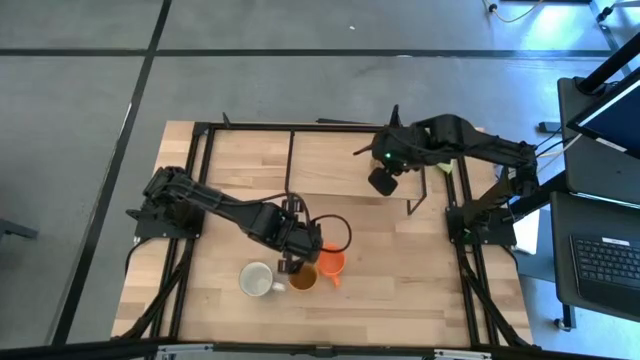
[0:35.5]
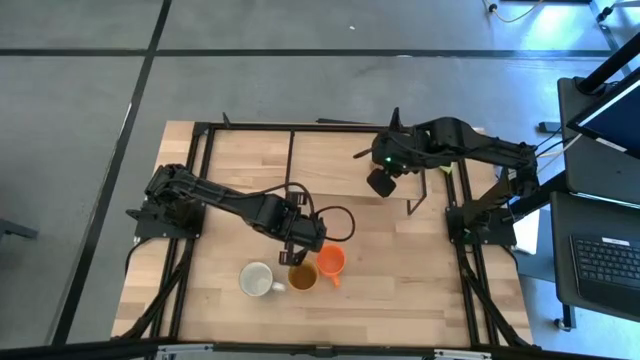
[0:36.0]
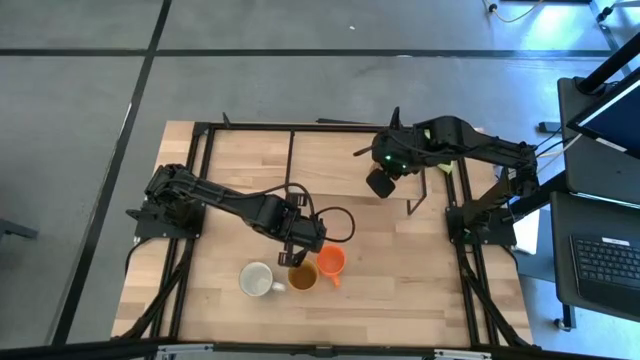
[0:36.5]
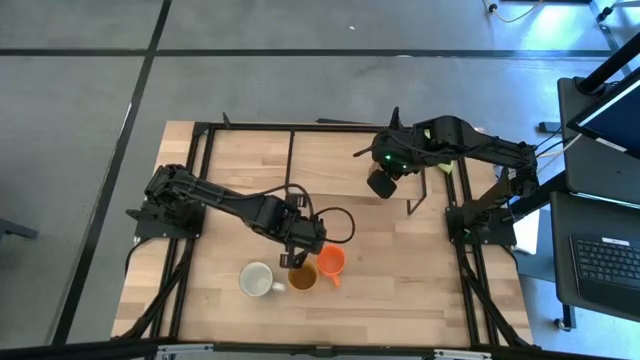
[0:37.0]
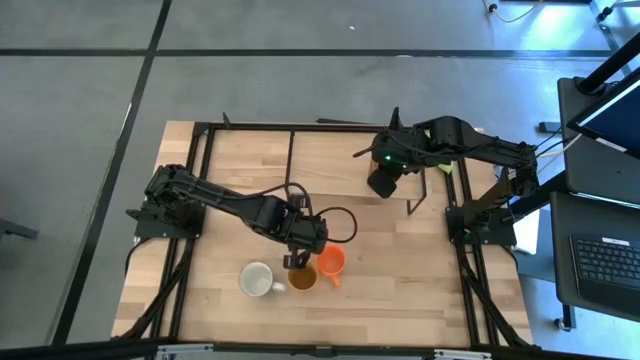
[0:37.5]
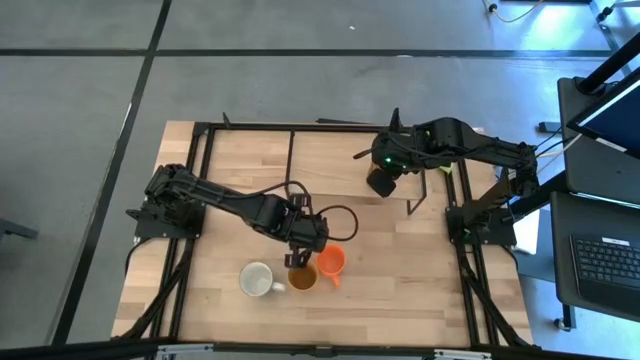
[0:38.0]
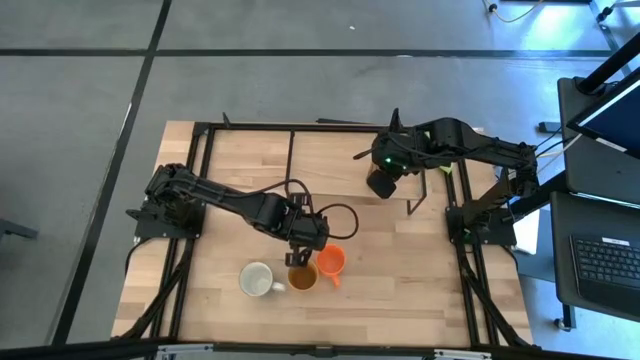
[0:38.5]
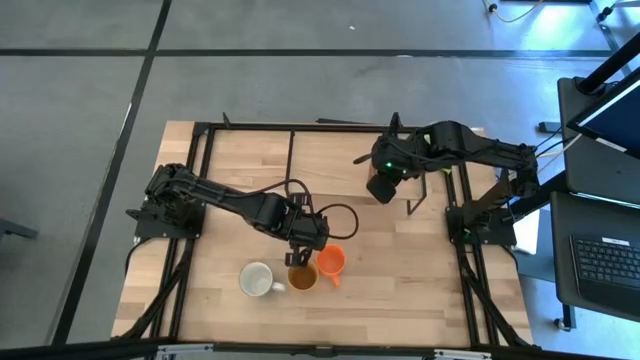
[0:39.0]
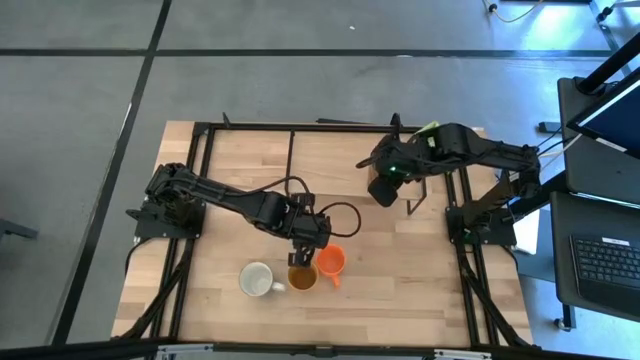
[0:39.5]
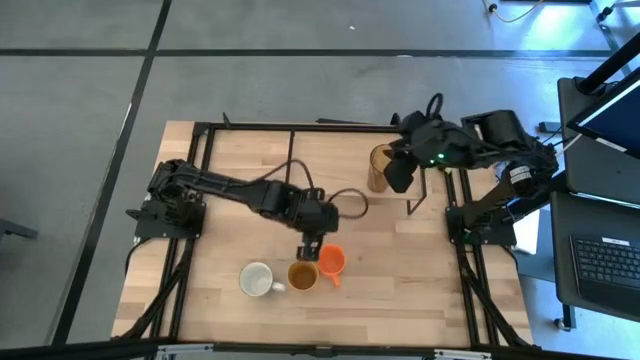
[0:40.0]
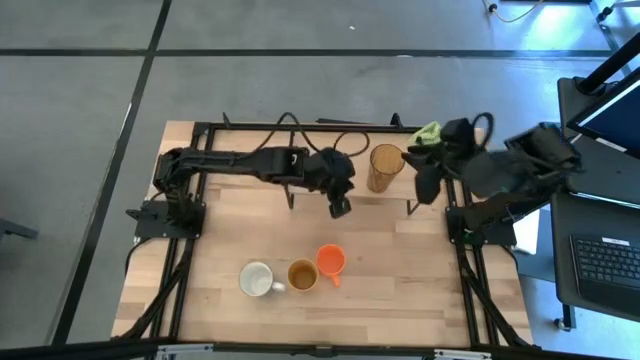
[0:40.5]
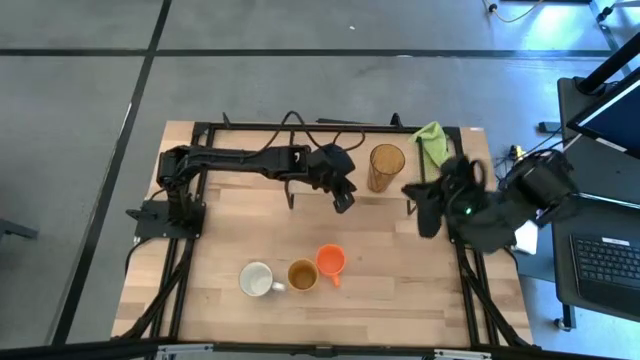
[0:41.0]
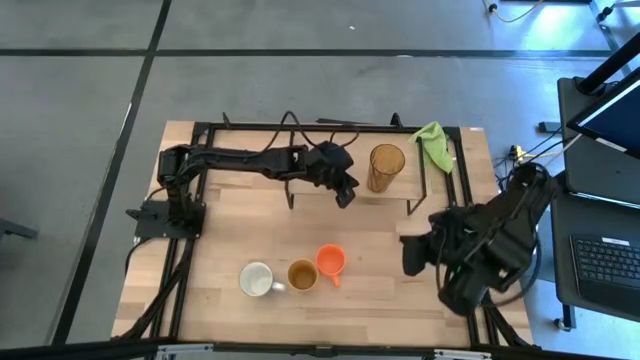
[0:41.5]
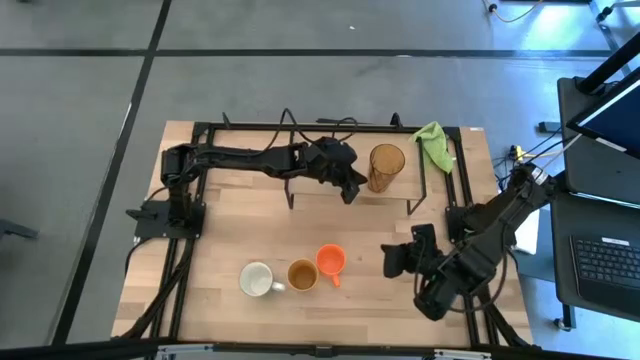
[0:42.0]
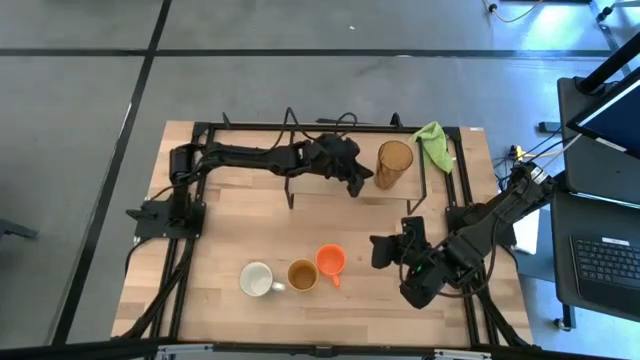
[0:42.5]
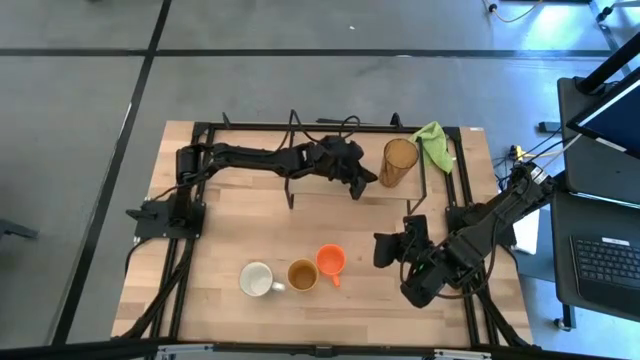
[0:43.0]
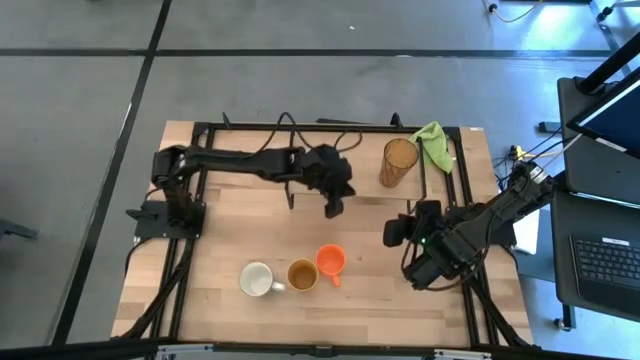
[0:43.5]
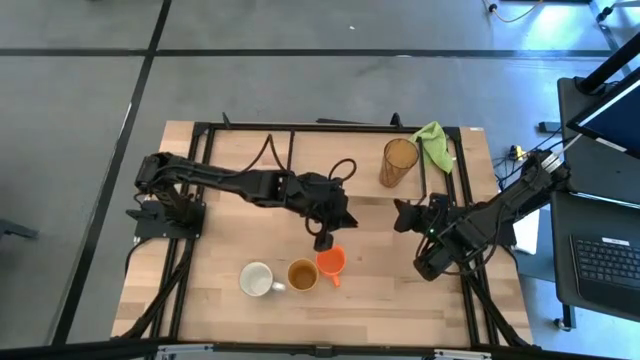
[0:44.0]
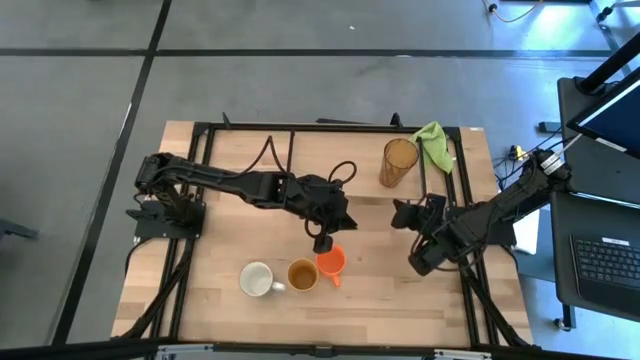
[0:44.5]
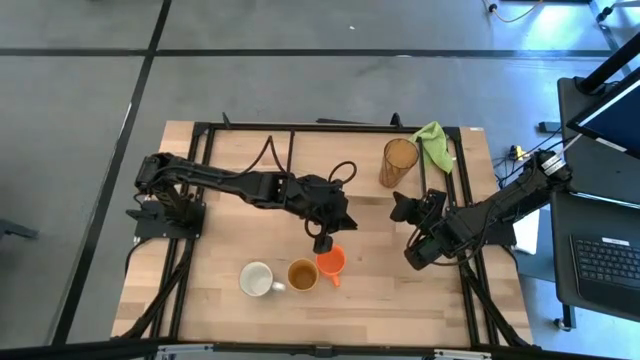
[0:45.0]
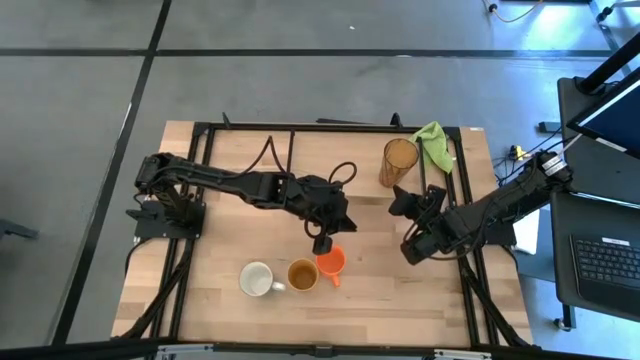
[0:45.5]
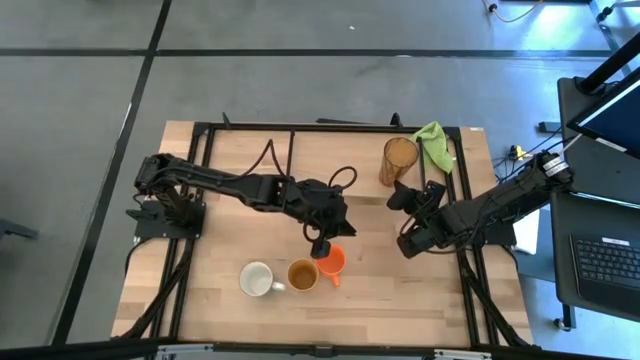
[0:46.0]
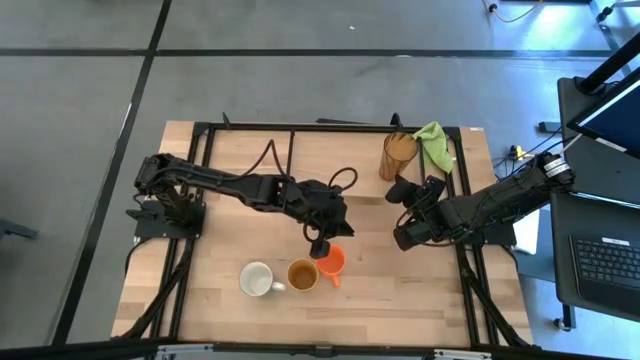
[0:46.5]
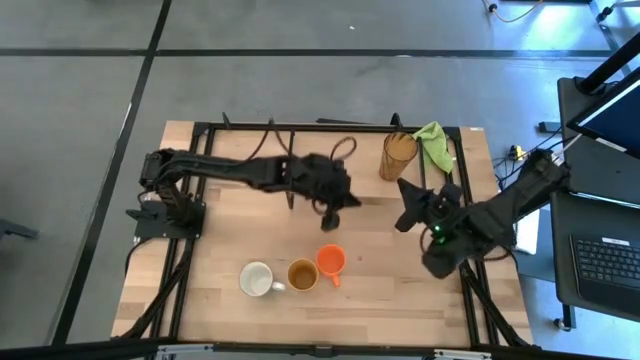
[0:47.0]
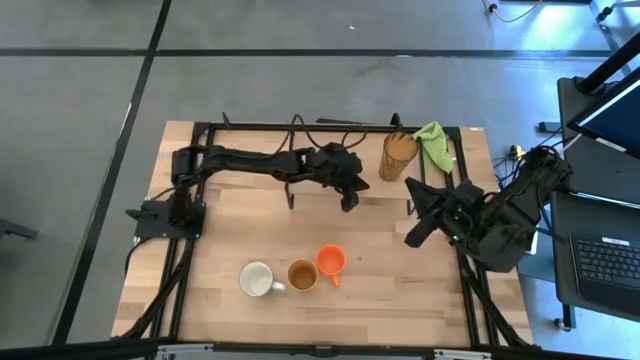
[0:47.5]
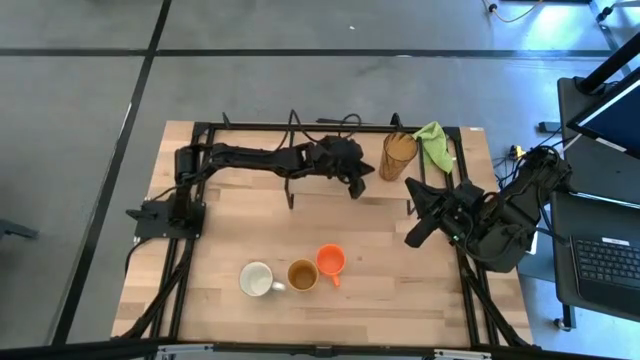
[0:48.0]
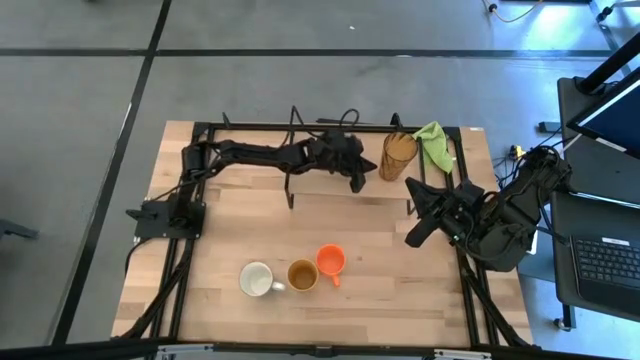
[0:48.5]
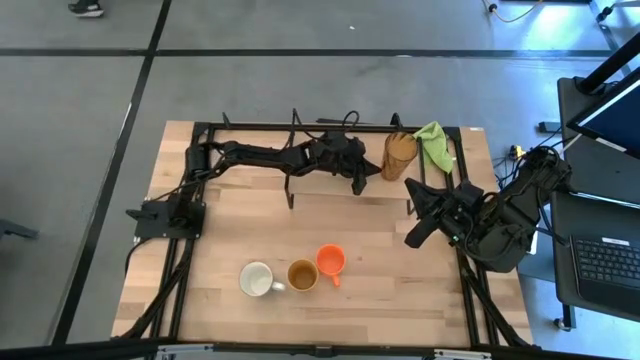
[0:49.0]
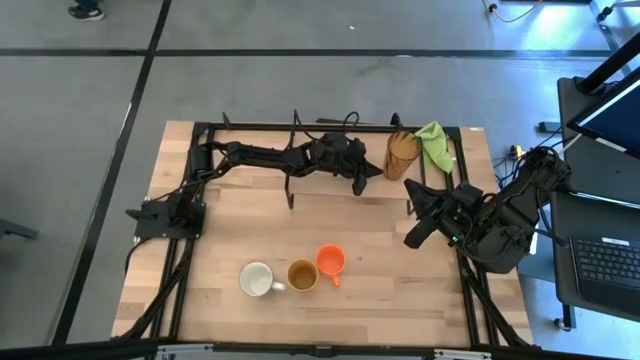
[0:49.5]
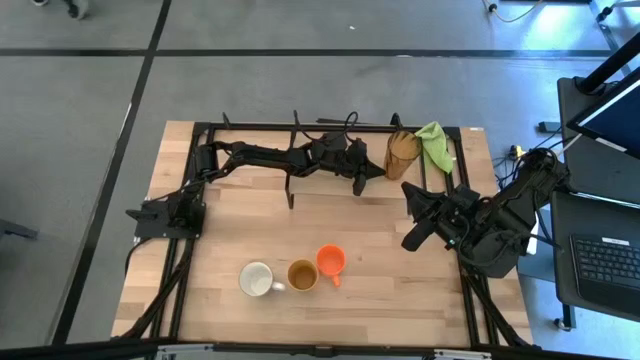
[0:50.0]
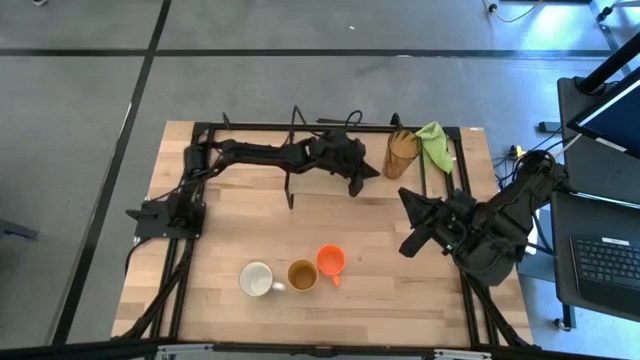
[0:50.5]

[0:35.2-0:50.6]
Task: Stack small to large cups/mugs on shelf
Put the brown cup on the shelf

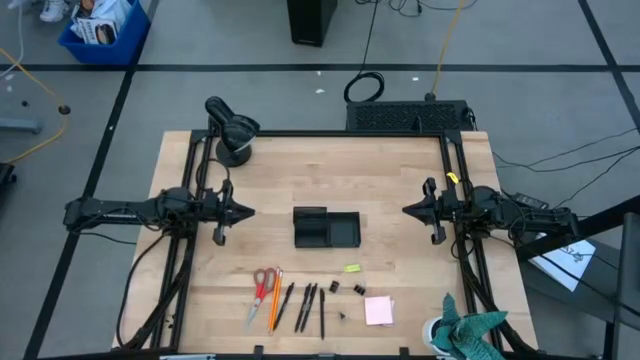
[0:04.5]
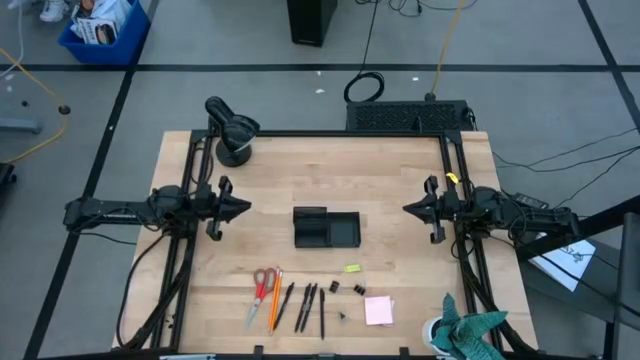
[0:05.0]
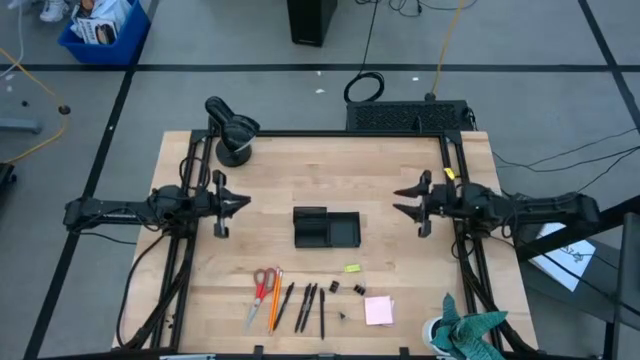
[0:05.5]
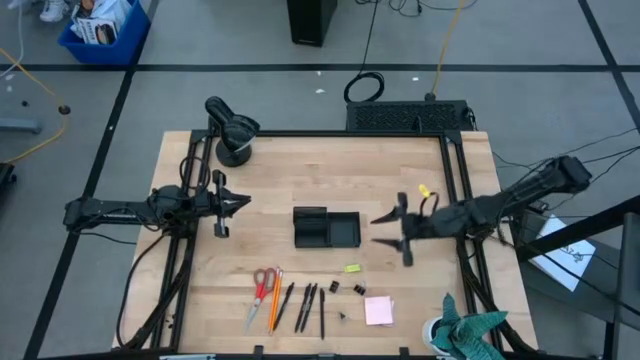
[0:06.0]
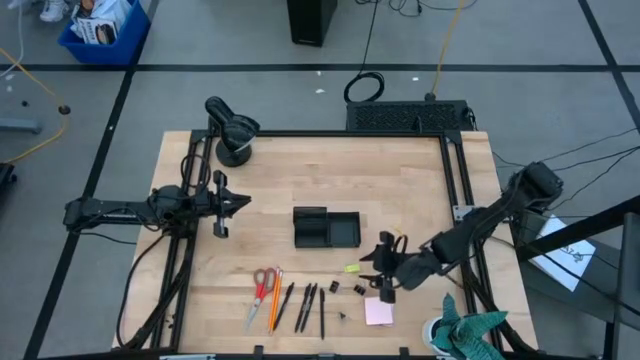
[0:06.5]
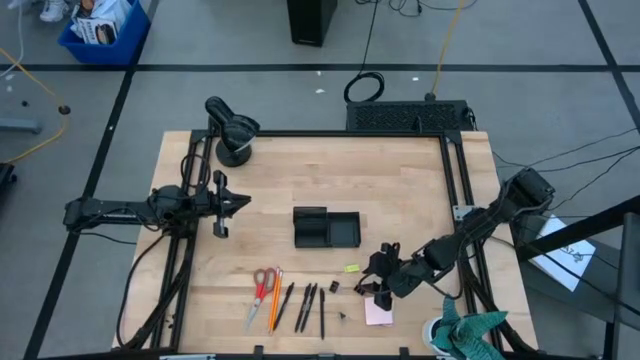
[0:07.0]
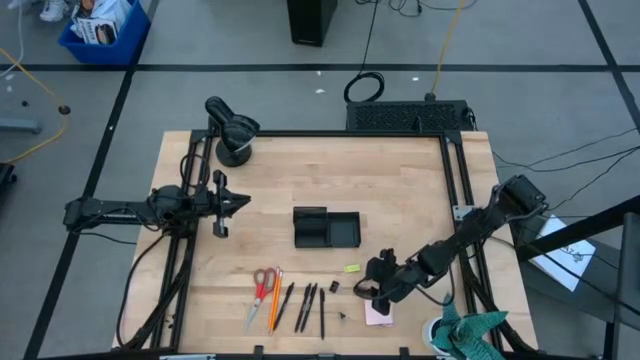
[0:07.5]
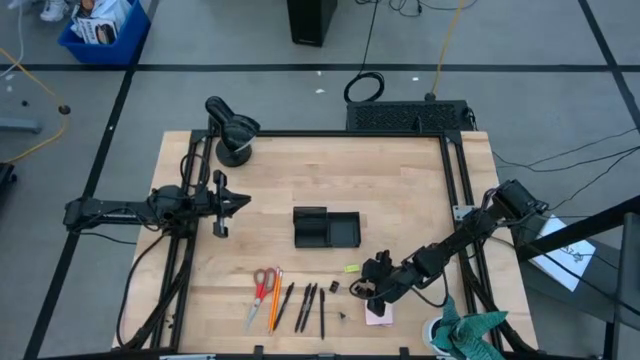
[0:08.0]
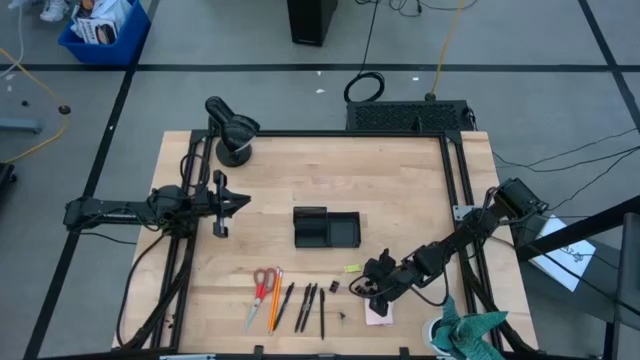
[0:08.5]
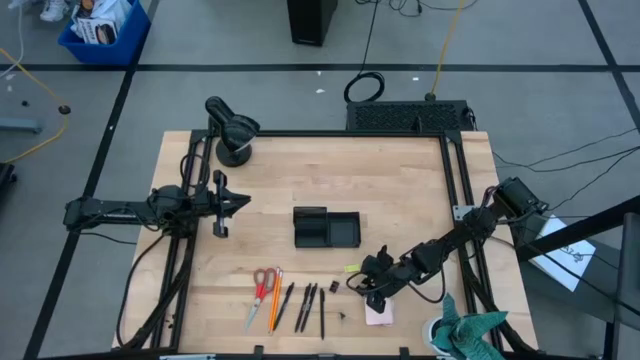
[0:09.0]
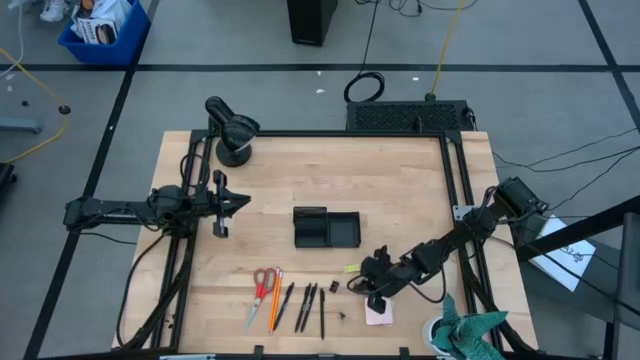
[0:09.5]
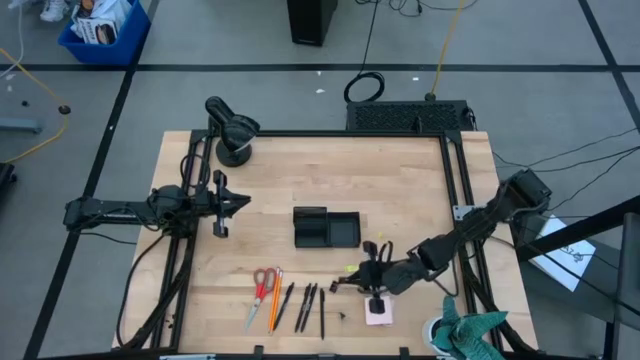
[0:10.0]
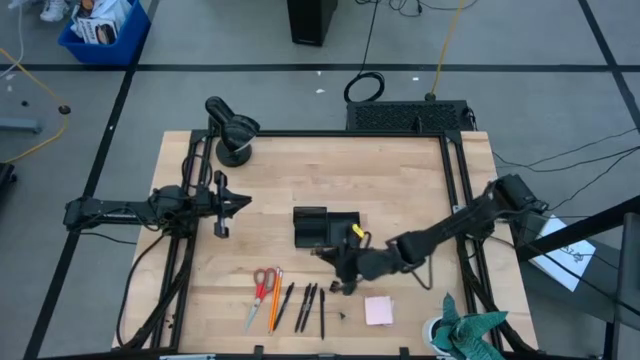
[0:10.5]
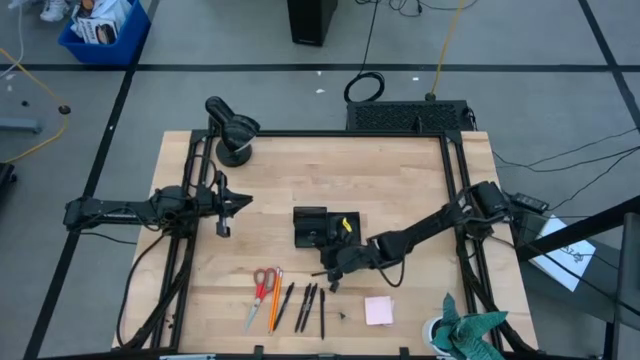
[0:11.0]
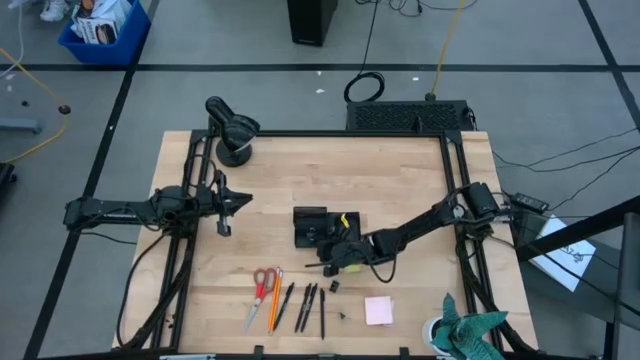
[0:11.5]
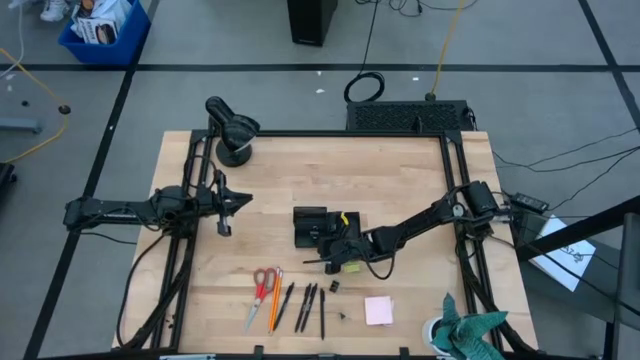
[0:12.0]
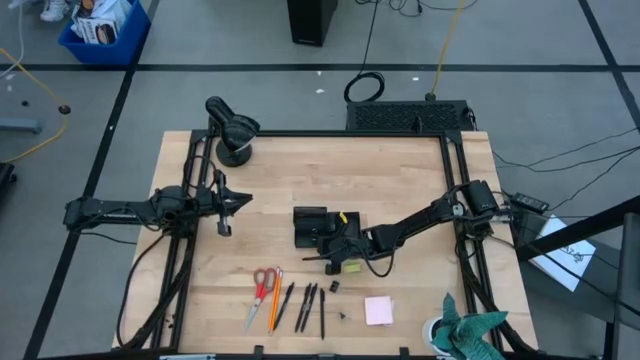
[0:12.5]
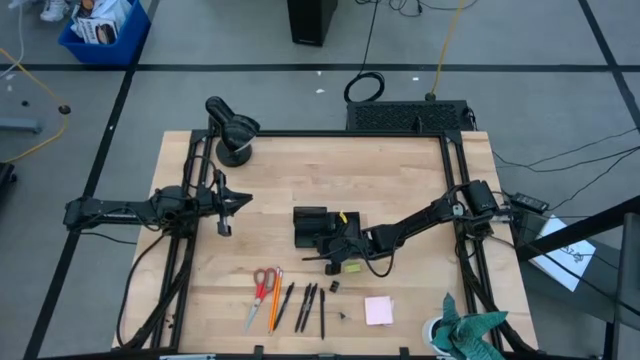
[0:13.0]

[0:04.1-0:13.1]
Task: Pick and place office supplies into organizer
Put the binder clip into the black desk organizer
